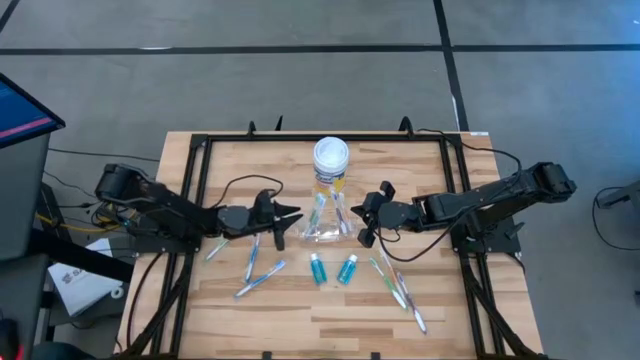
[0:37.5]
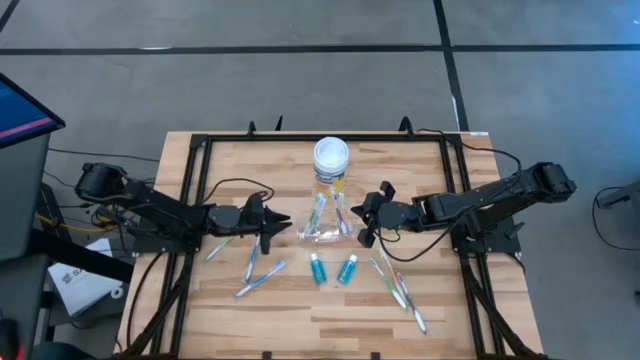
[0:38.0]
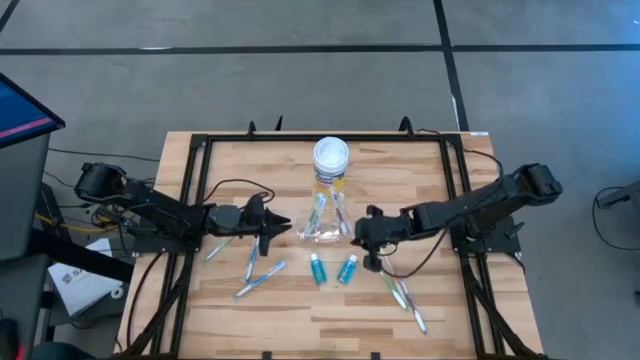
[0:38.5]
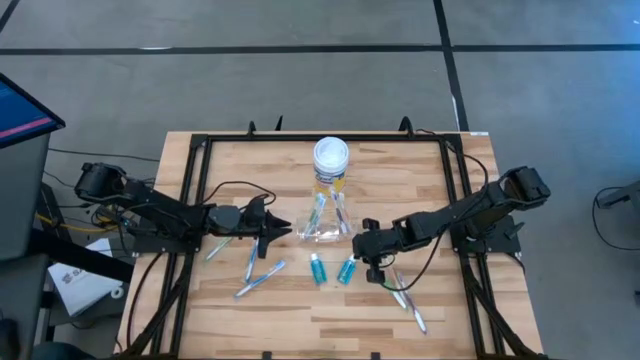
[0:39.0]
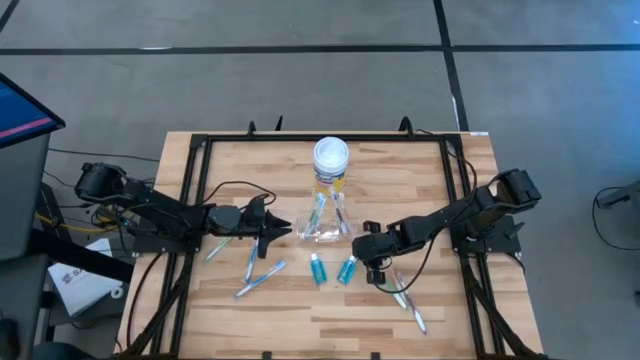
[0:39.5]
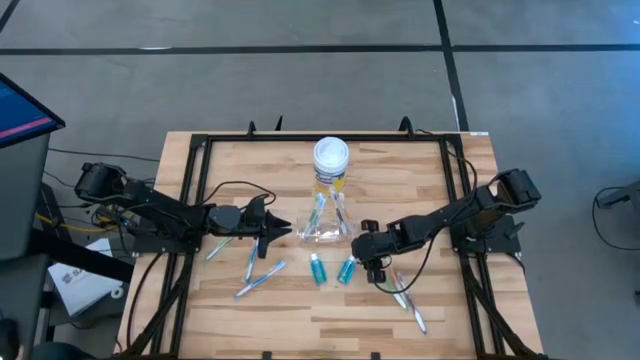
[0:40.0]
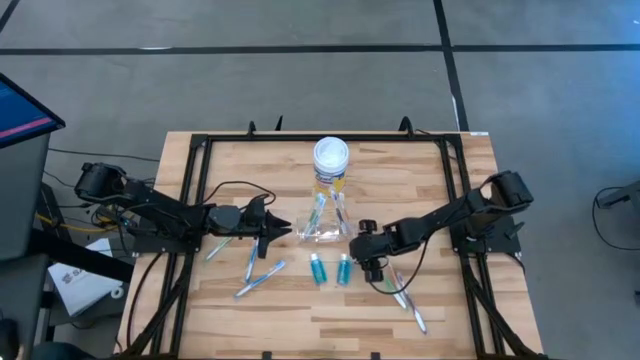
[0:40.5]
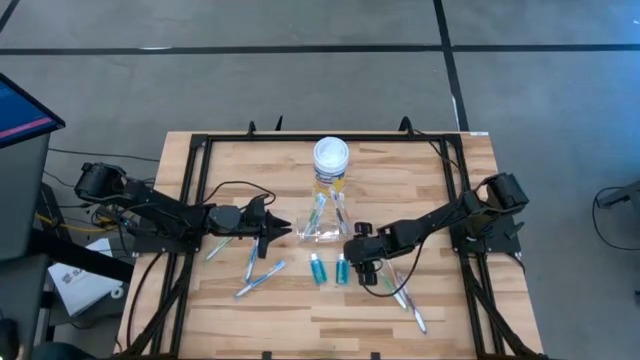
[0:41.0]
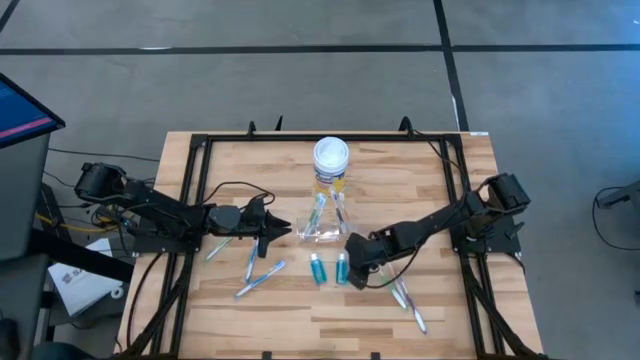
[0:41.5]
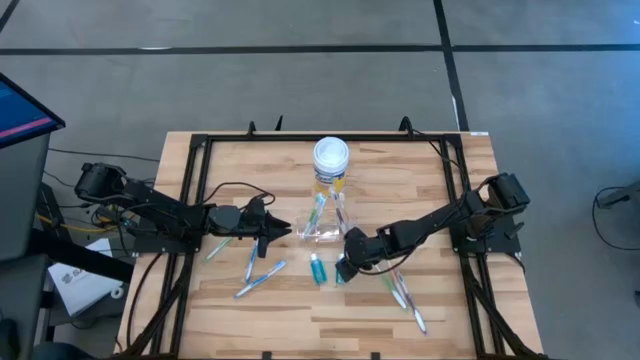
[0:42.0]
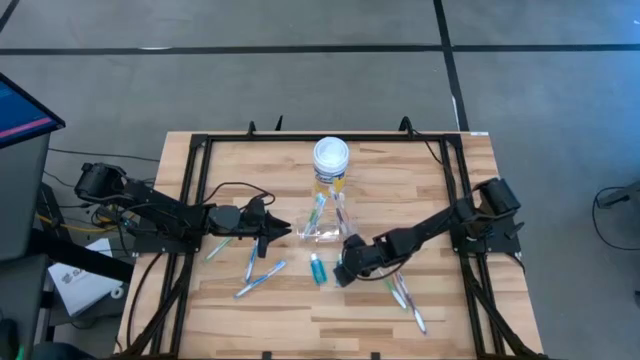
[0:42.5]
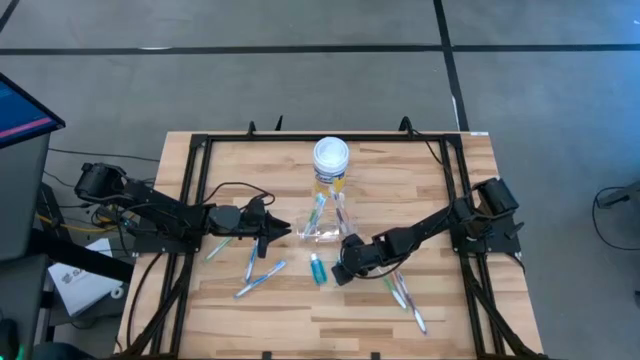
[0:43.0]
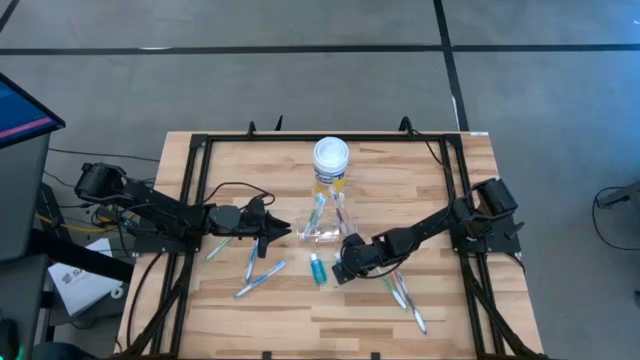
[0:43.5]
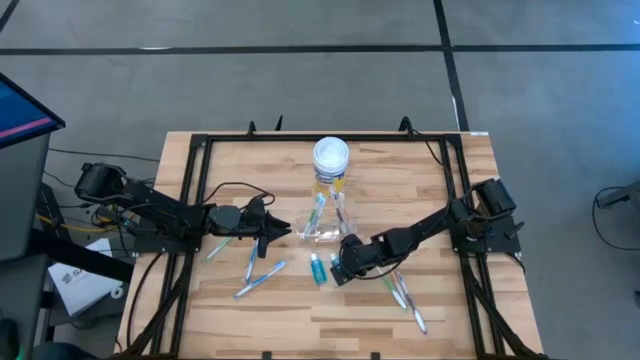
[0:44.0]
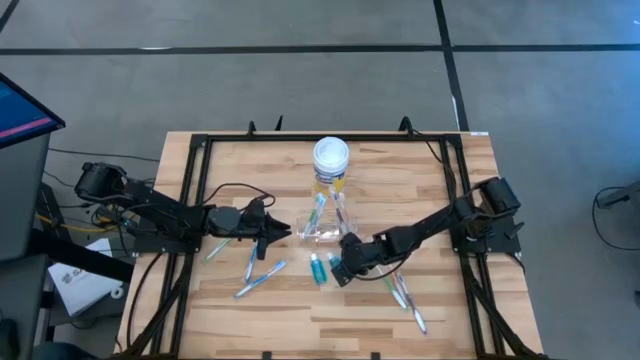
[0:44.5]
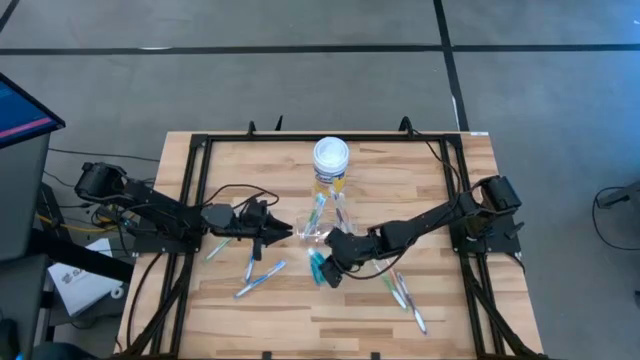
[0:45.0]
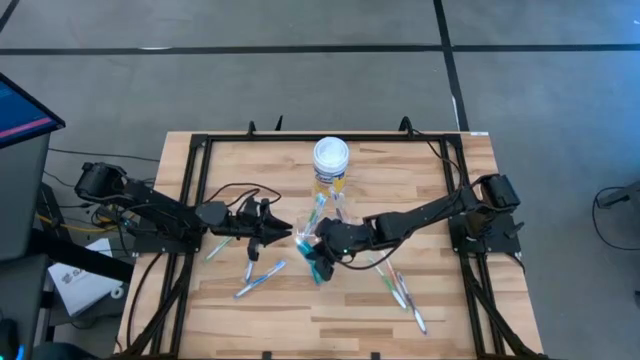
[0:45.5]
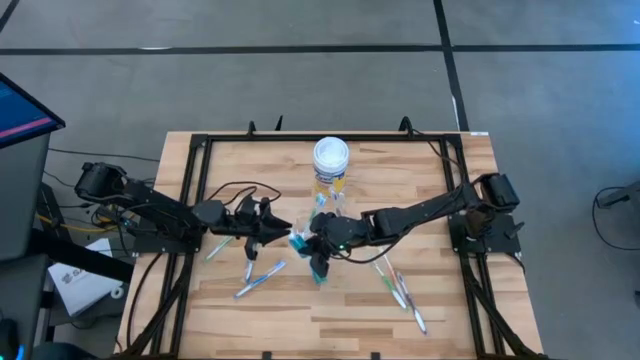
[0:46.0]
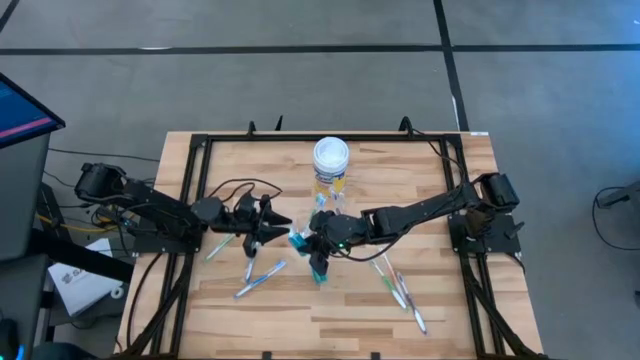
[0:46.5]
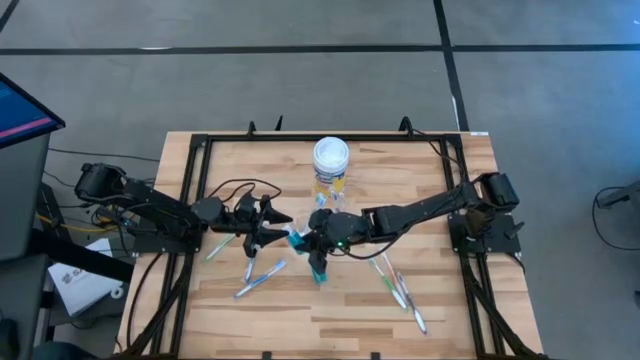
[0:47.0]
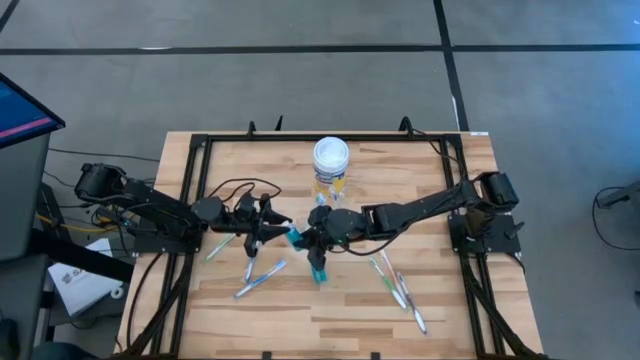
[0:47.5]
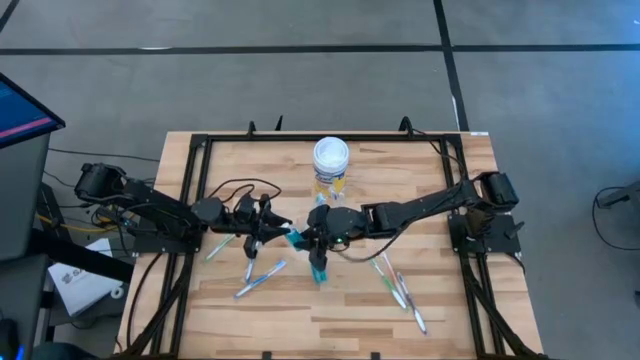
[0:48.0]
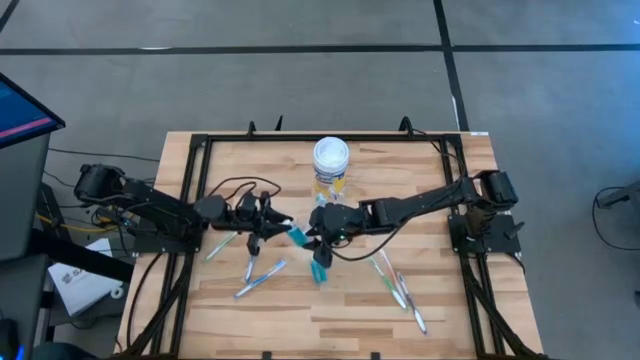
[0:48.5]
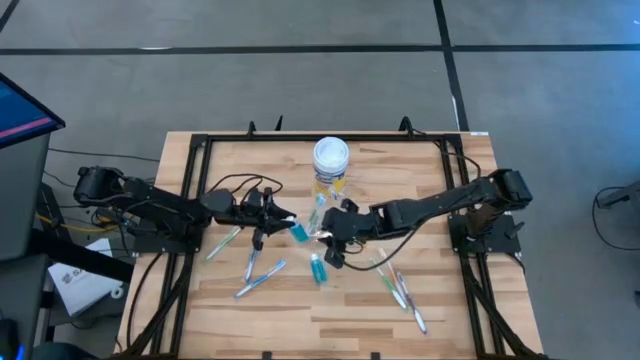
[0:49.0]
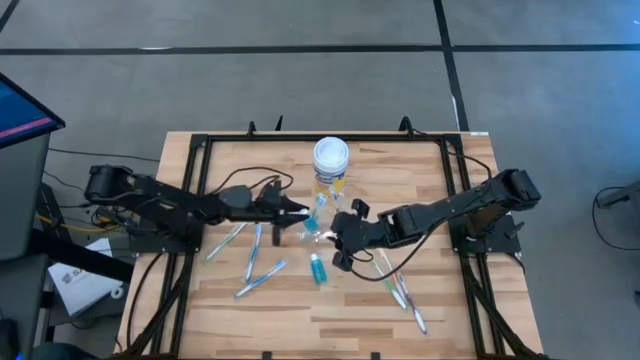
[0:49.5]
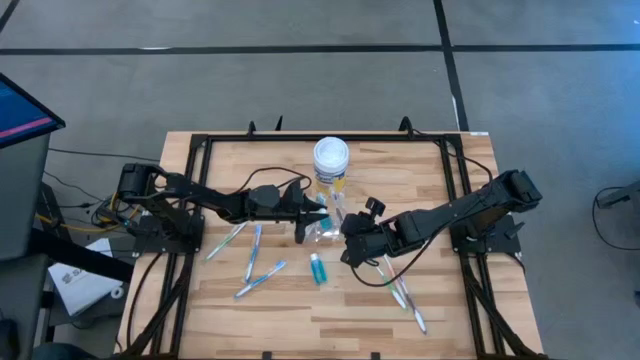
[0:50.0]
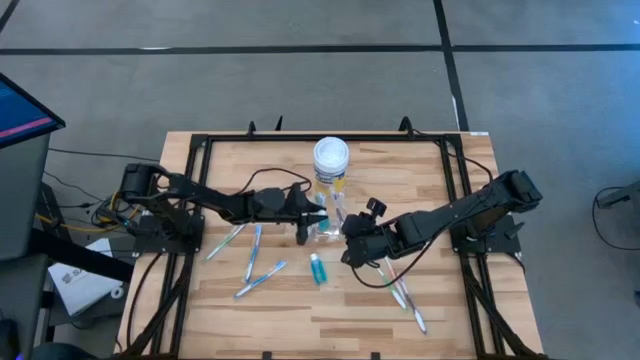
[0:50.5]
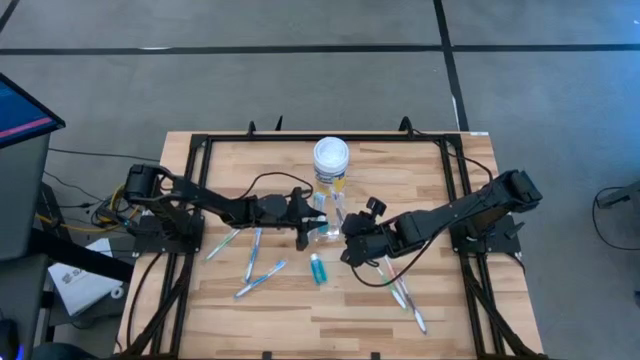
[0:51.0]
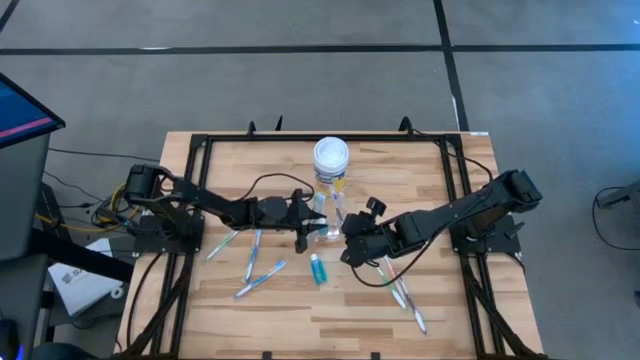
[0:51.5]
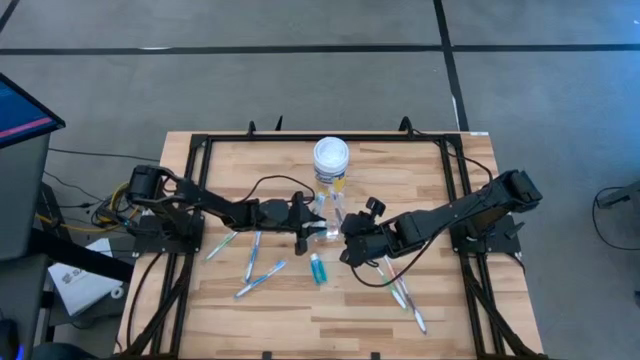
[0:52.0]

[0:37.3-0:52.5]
Task: Pick & Place toothbrushing station
Put the right blue mouthwash into the transparent organizer

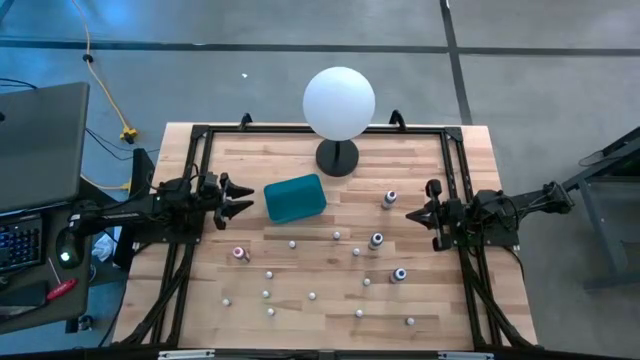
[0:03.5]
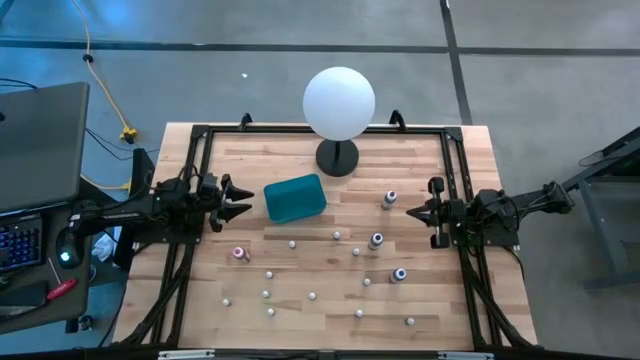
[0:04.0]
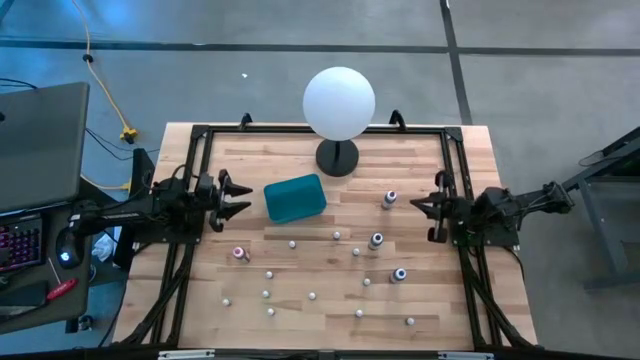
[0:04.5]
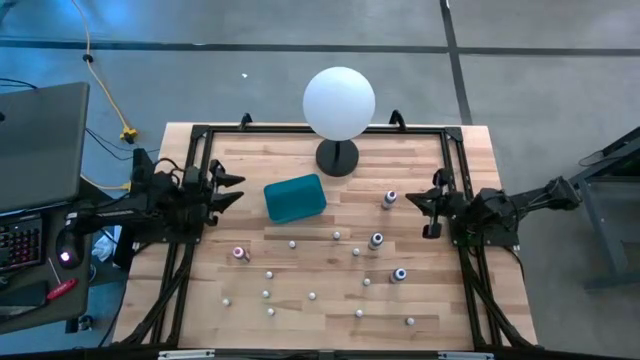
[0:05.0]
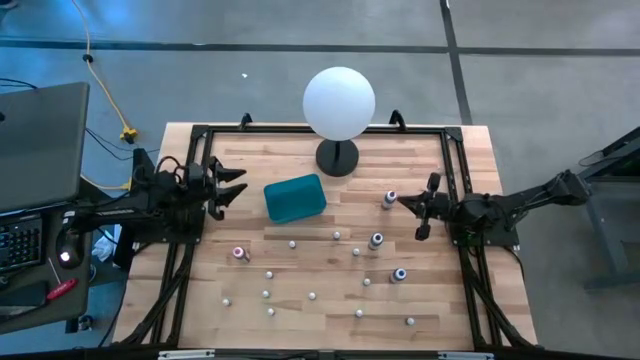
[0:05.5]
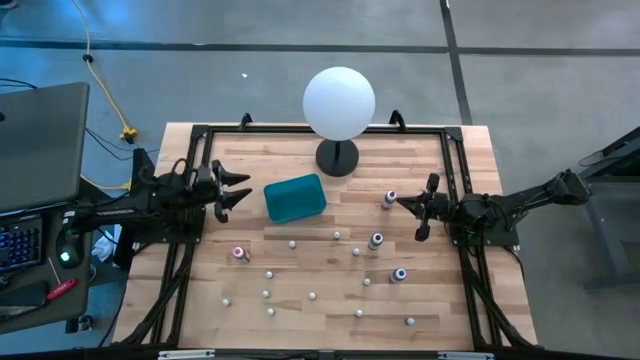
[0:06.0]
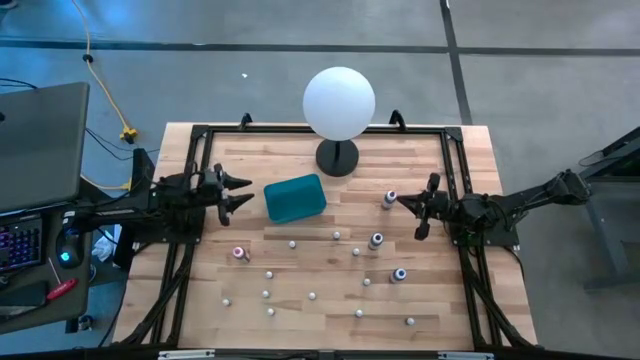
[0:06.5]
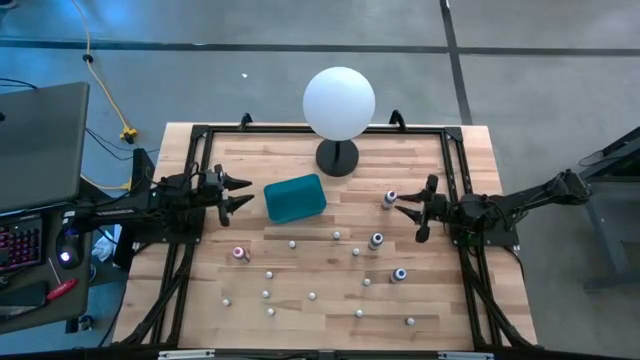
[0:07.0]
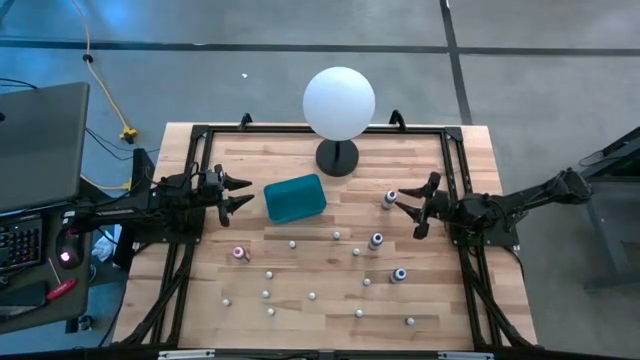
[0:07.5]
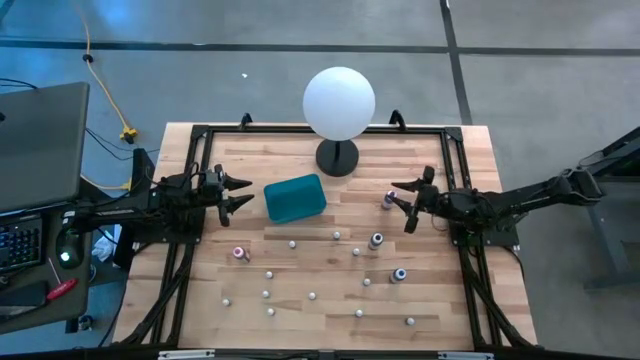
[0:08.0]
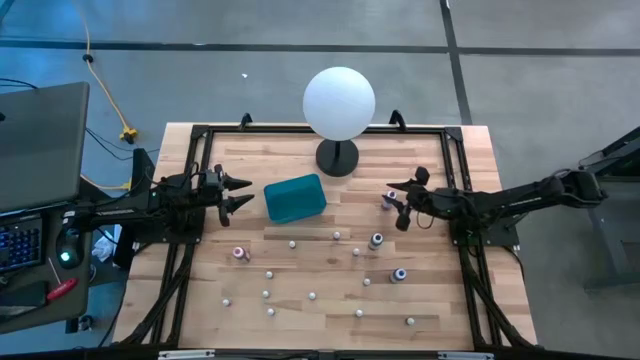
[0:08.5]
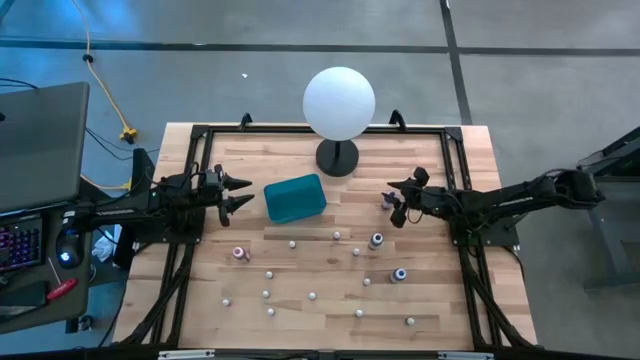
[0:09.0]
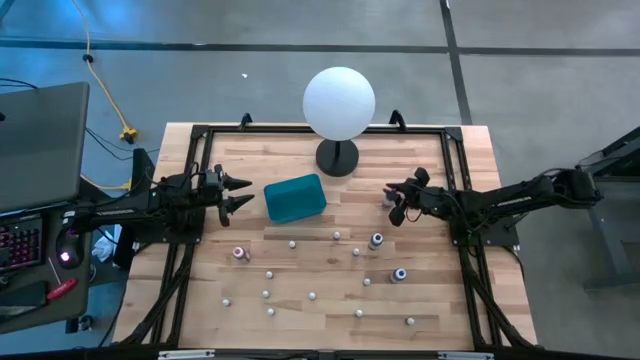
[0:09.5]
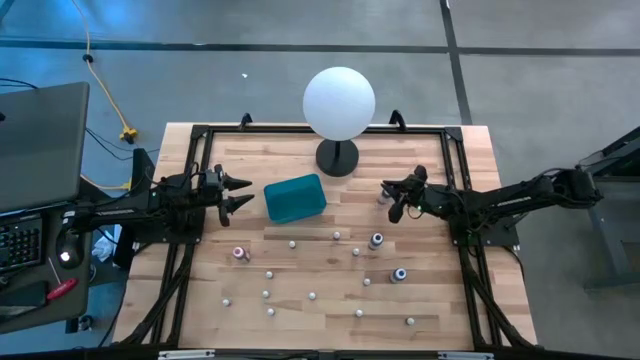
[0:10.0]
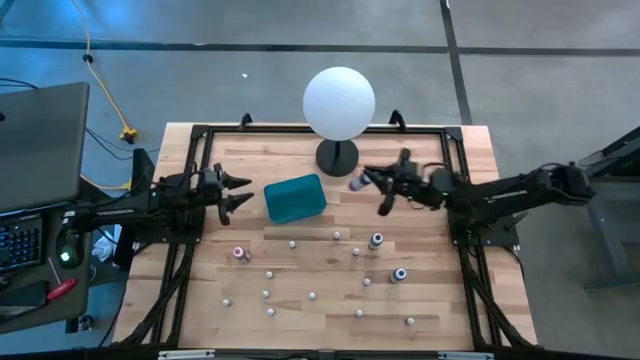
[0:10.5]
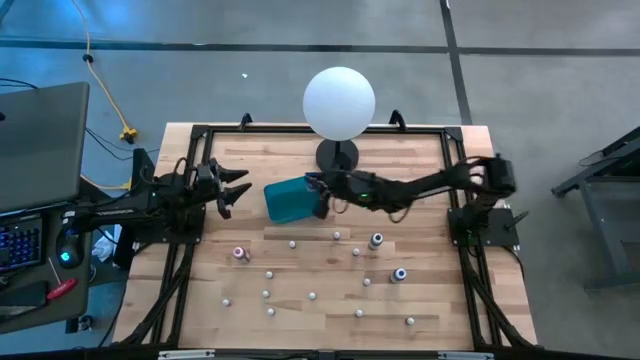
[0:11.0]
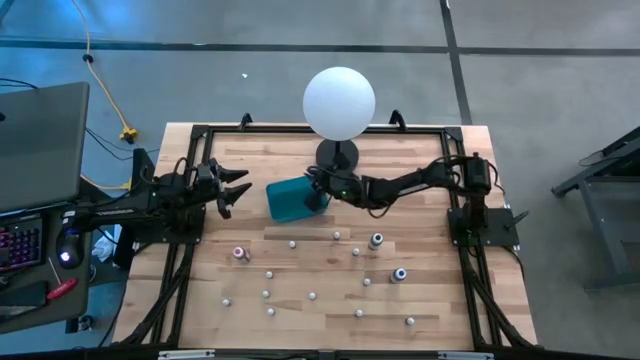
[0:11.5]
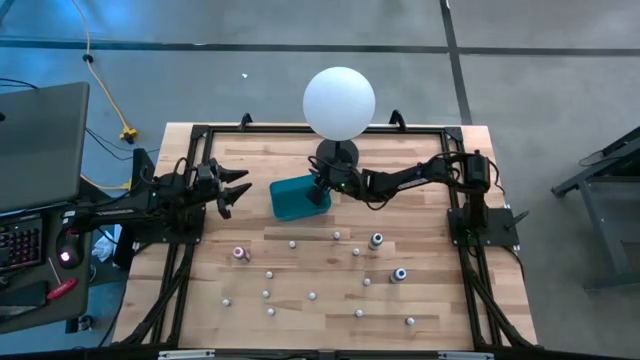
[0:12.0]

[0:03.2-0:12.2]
Task: Pick & Place food coloring
Put the large purple food coloring bottle into the blue bin
